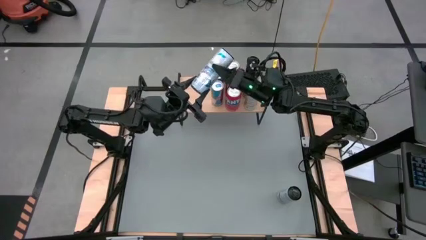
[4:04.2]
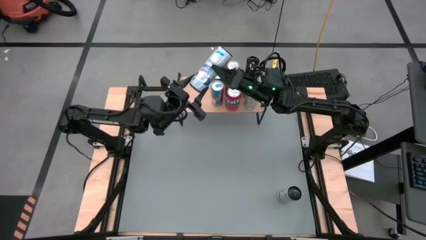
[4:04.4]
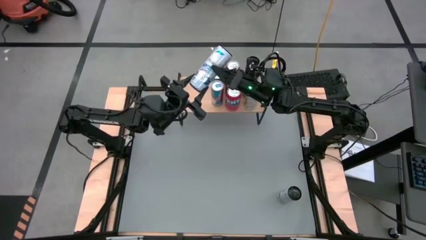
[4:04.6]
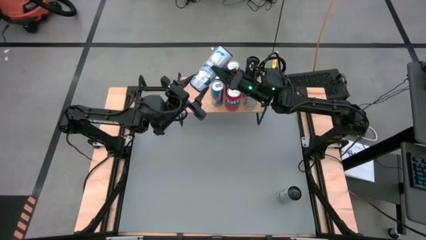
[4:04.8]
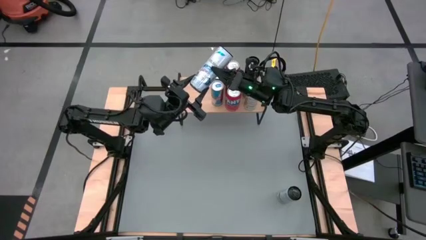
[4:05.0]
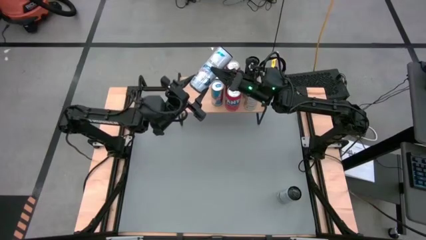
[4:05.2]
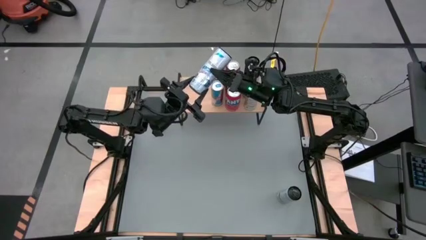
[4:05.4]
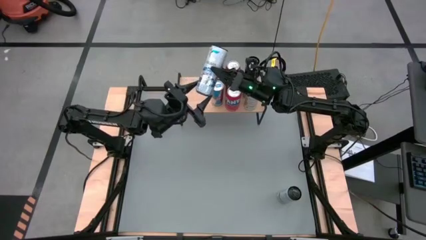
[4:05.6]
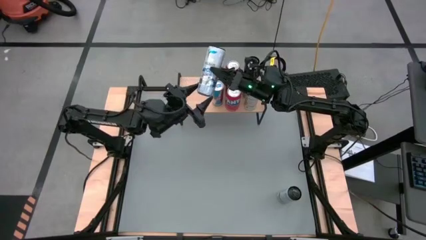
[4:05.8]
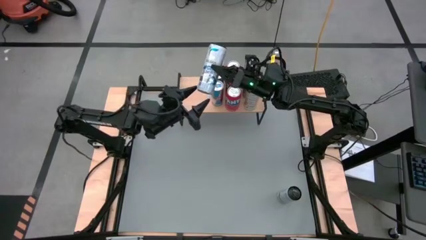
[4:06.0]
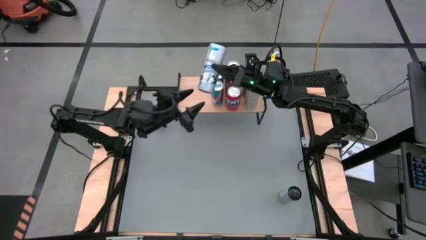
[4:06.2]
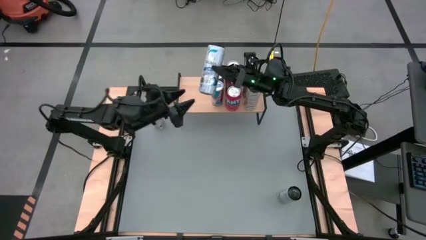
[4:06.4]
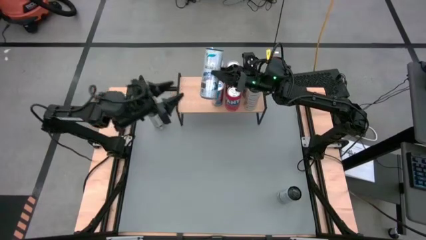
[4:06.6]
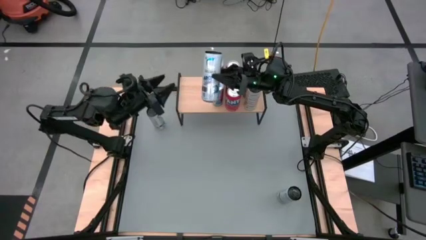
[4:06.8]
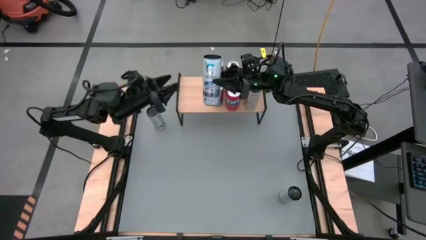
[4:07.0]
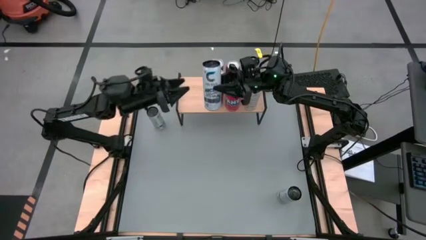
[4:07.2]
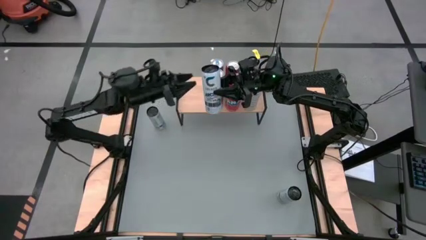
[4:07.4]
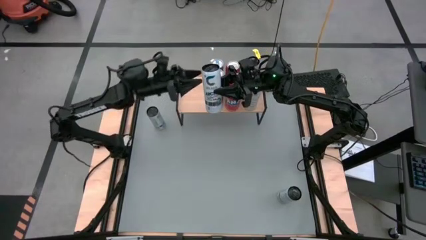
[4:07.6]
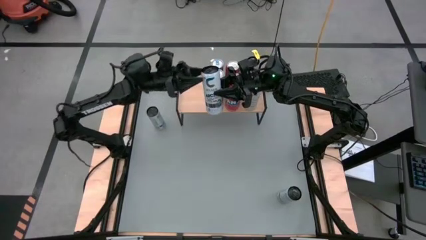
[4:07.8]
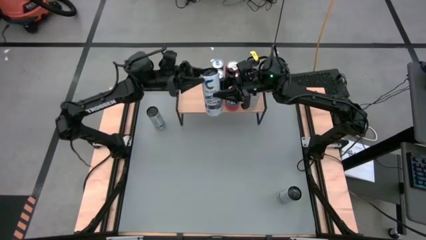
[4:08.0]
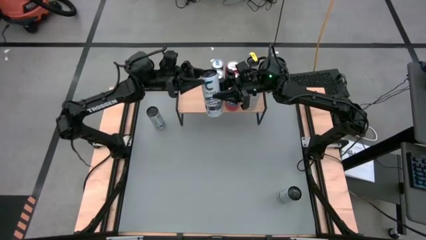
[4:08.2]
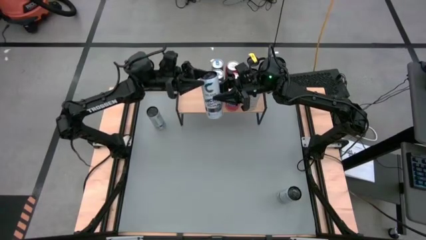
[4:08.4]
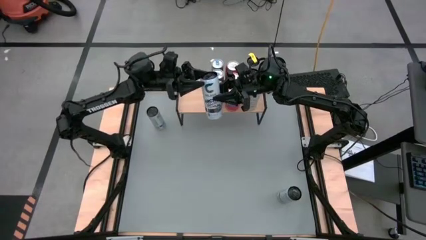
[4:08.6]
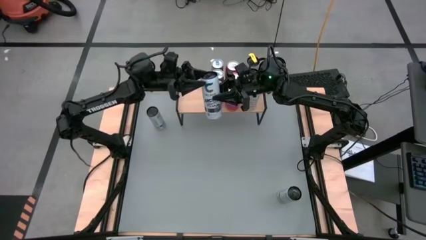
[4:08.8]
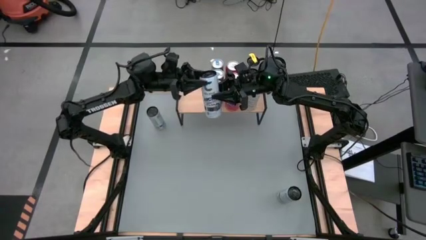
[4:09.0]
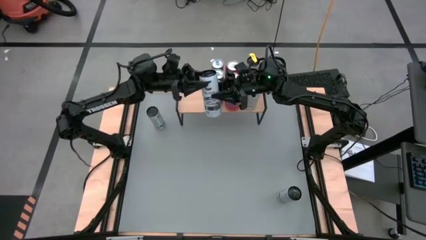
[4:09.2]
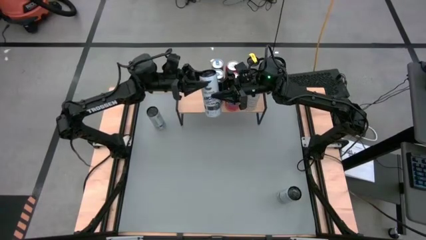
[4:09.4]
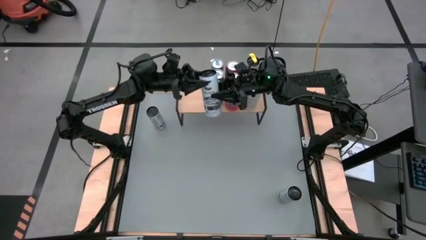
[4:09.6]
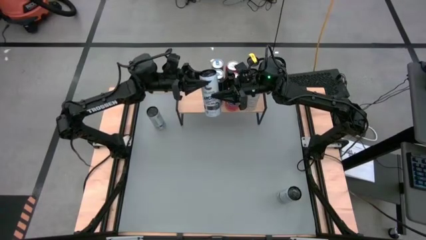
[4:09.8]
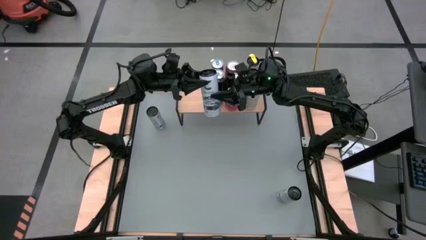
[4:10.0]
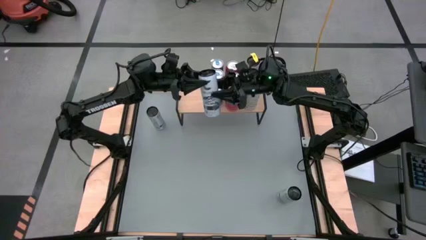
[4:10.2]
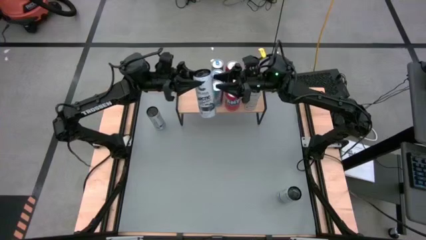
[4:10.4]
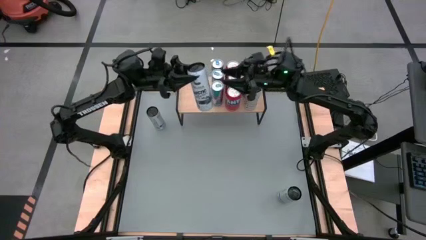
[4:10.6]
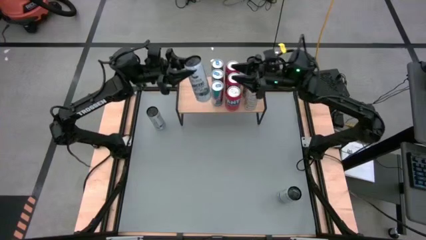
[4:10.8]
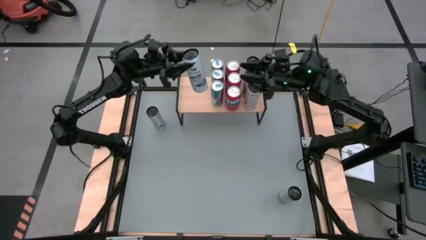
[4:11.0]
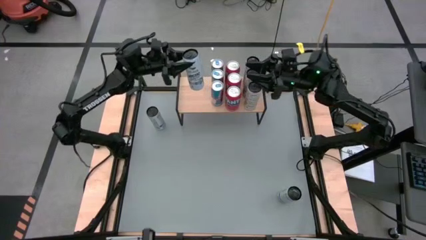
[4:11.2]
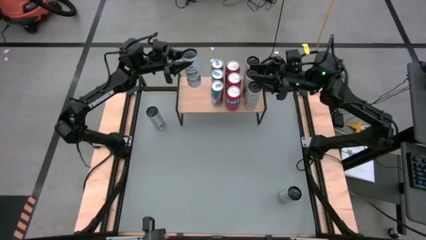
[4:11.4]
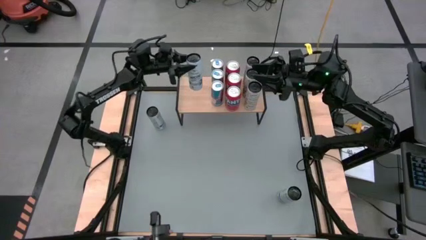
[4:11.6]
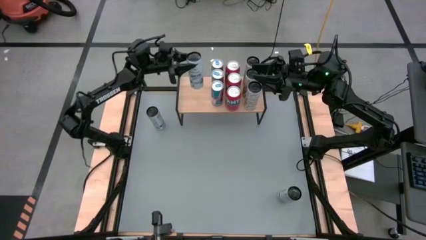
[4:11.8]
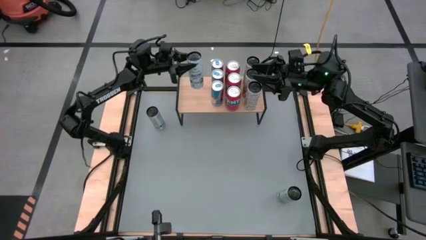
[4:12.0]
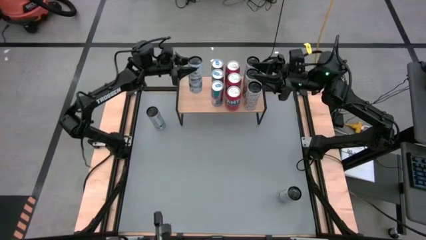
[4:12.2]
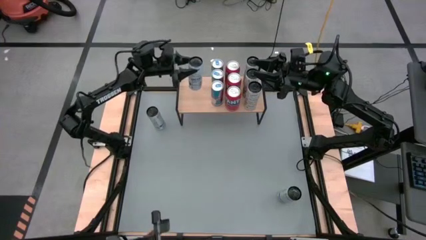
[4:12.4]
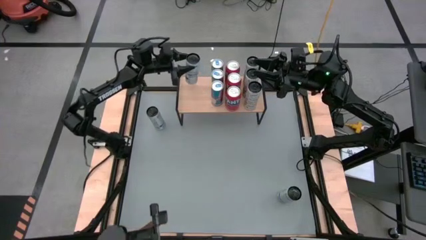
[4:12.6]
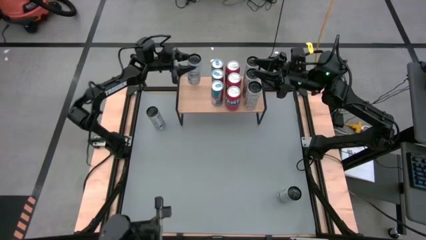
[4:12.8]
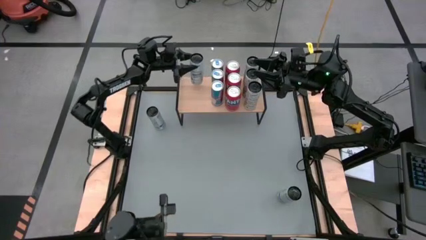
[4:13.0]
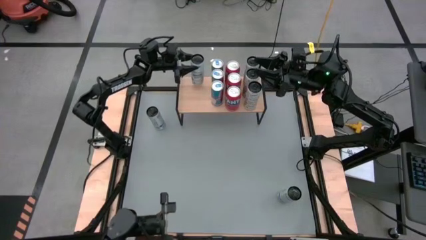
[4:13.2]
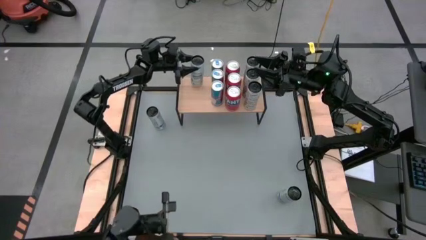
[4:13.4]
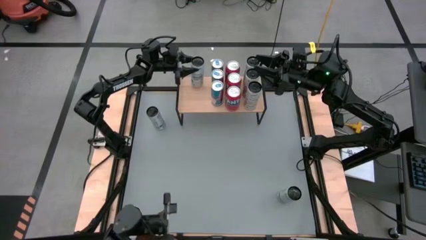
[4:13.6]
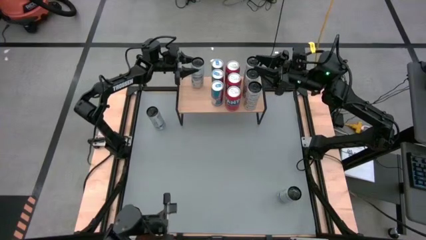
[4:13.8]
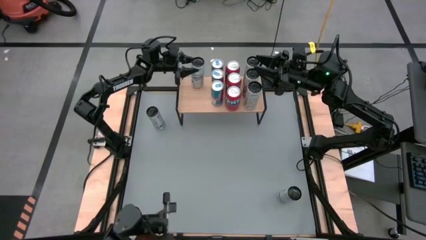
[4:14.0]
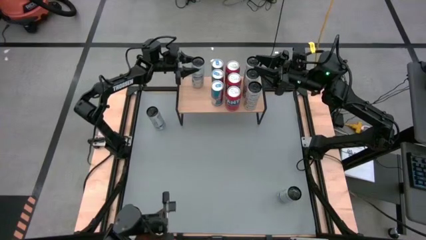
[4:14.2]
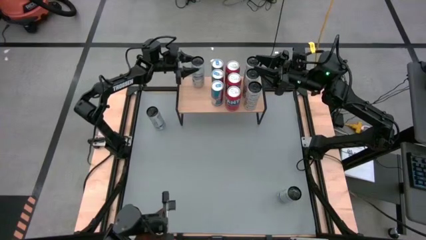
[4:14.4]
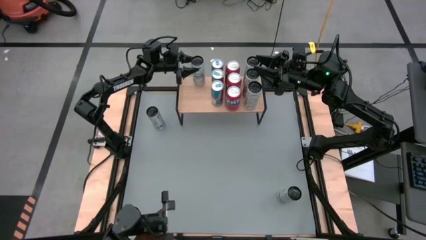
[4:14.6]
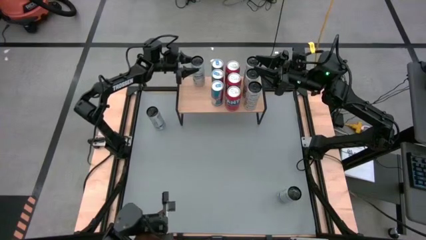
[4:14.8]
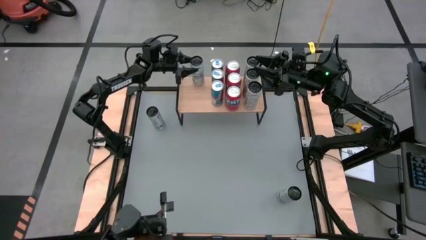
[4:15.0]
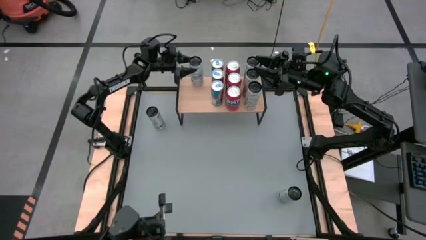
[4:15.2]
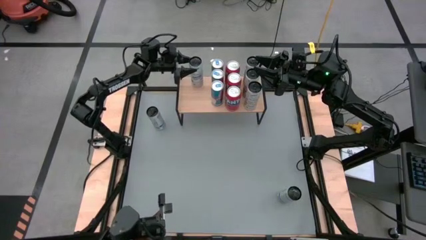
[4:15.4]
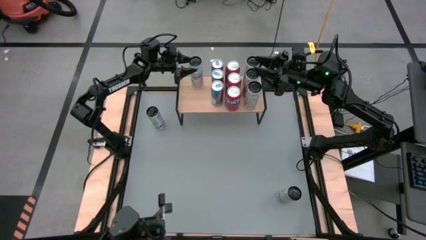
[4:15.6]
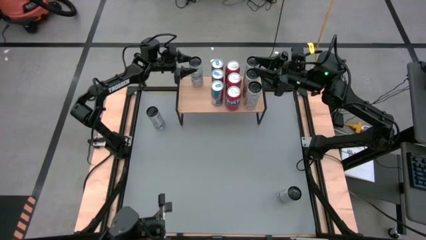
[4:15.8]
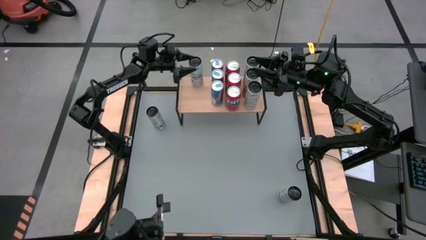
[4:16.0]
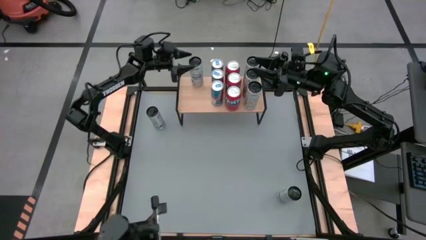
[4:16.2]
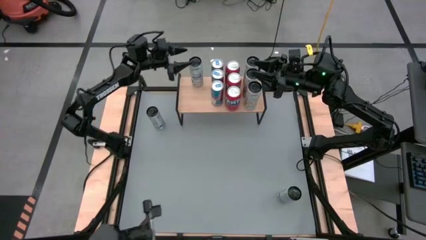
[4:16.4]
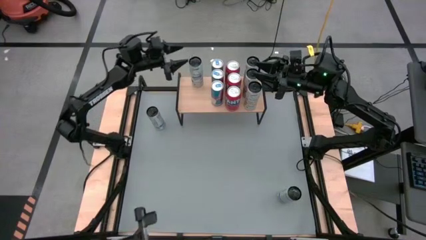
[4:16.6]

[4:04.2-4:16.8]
Task: Place canned beverage on shelf
Put the top right white soda can on the shelf

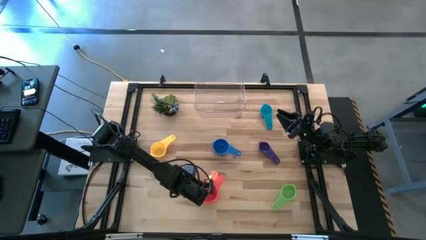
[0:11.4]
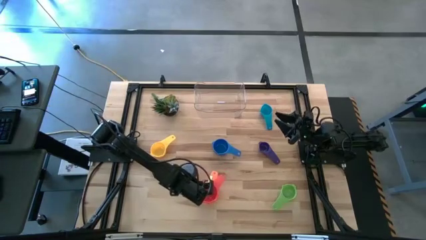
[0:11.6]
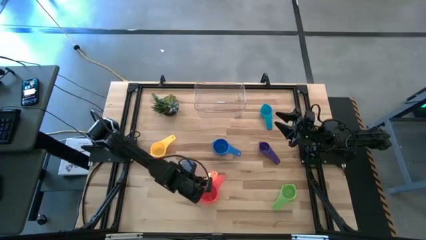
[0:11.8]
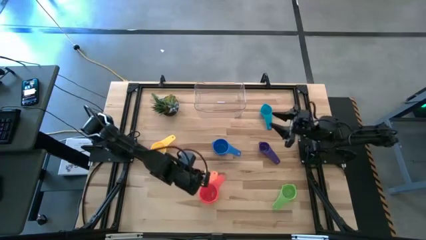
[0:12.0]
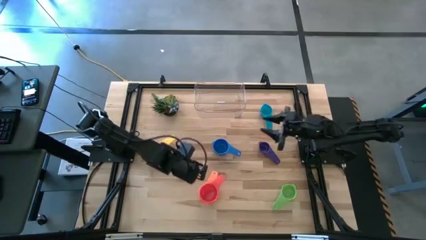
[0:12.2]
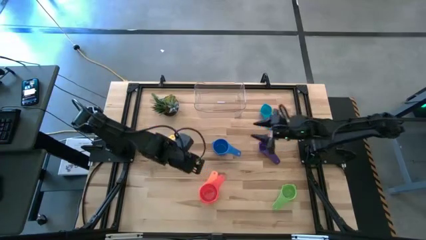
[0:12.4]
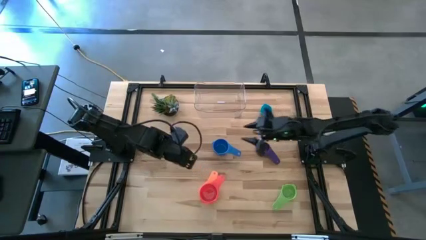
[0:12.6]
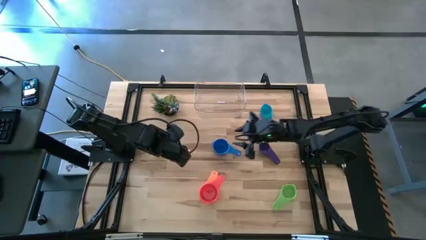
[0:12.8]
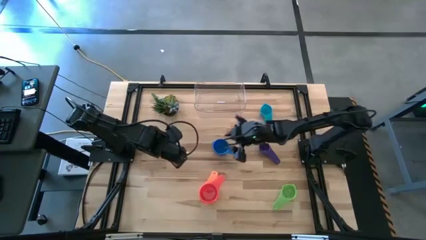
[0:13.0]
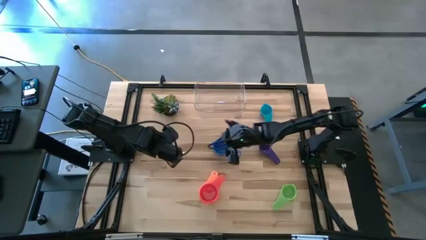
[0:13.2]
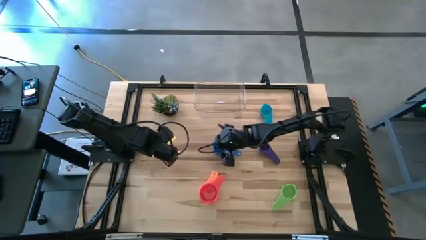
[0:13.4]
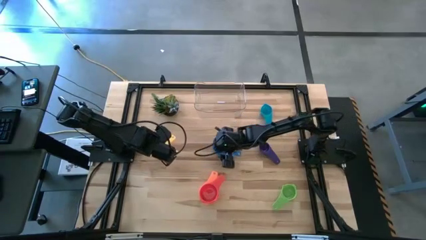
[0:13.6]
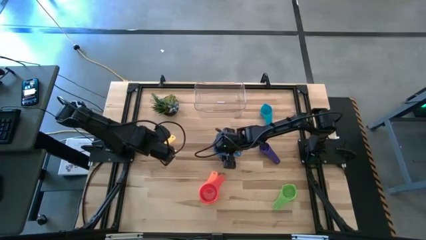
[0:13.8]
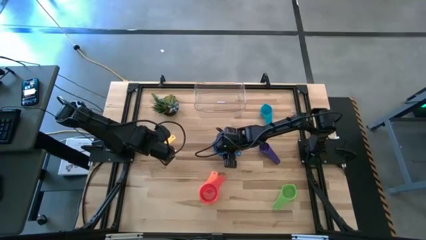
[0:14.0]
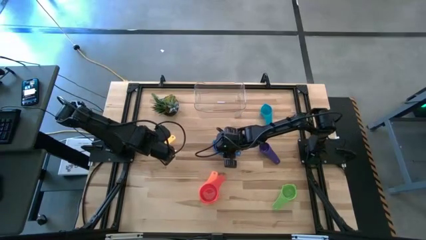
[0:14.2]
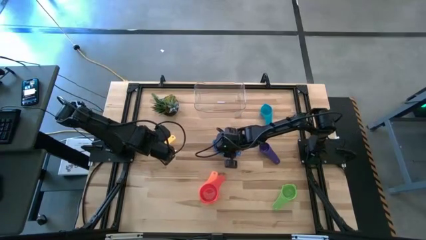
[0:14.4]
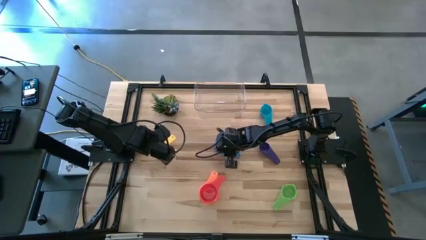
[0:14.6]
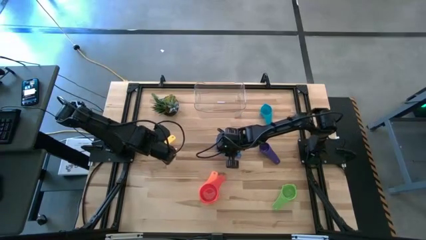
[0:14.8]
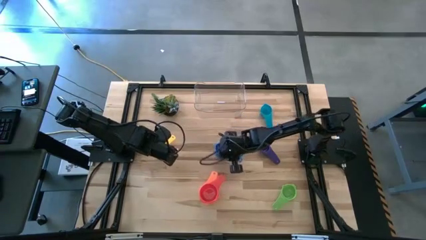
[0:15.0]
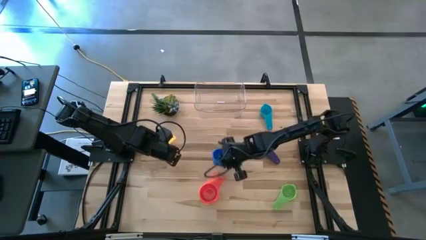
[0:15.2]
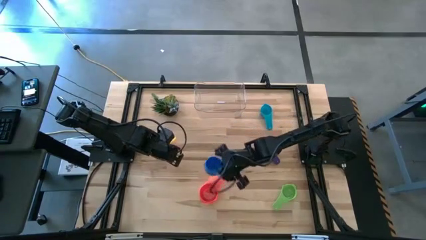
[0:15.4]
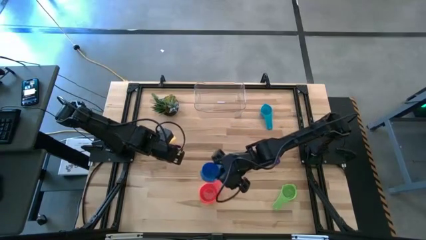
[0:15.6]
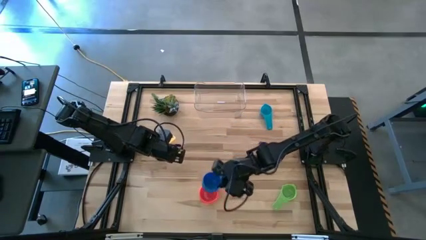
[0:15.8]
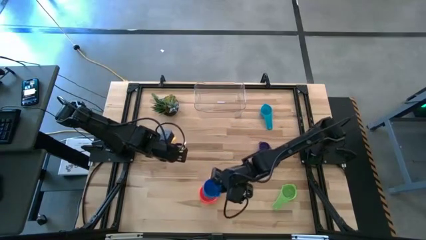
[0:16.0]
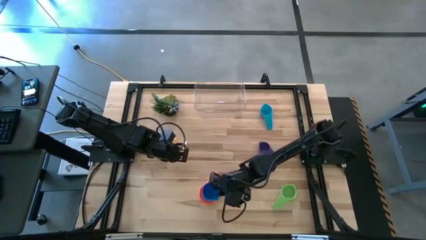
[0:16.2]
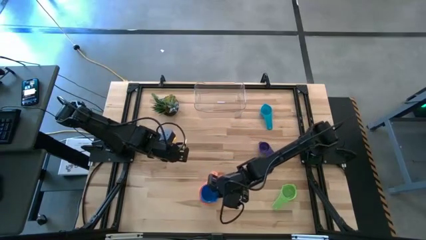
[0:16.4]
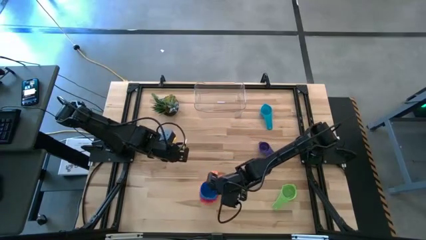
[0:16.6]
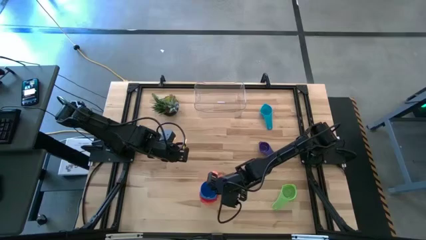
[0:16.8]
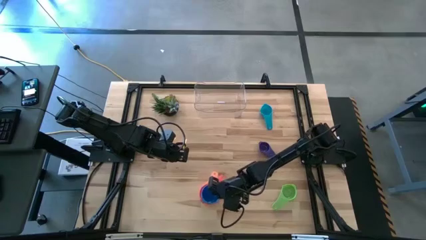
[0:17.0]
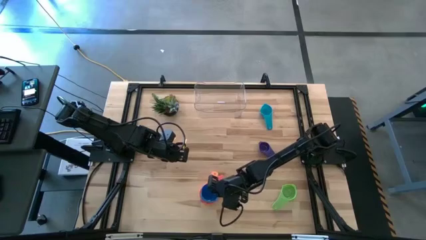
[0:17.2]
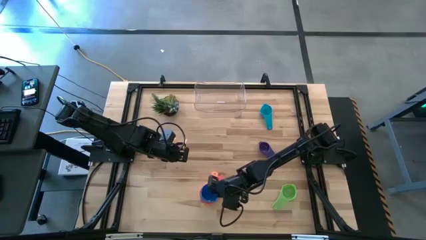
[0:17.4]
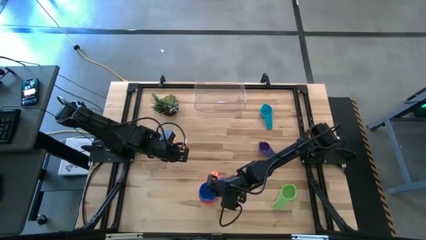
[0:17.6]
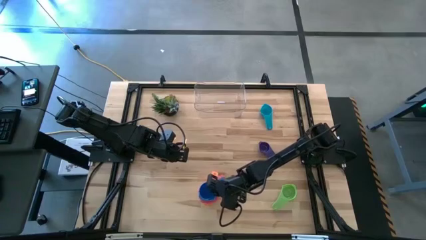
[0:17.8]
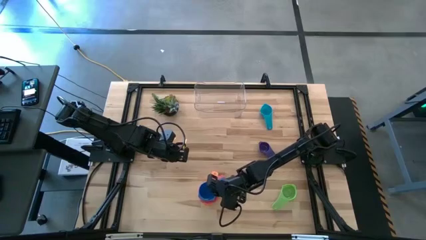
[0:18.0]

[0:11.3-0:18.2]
Task: Nest measuring cups in basket
Stack the blue measuring cup on the red measuring cup
